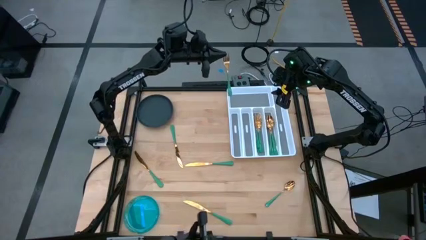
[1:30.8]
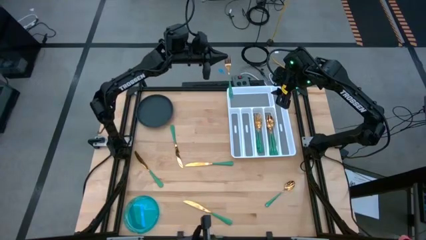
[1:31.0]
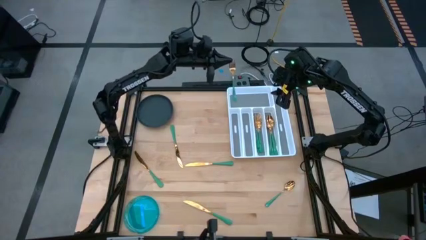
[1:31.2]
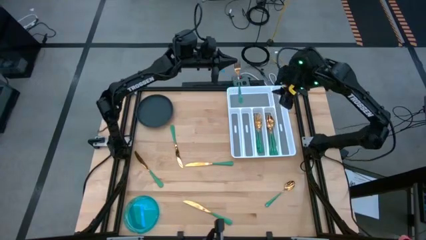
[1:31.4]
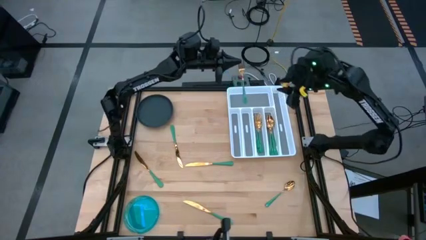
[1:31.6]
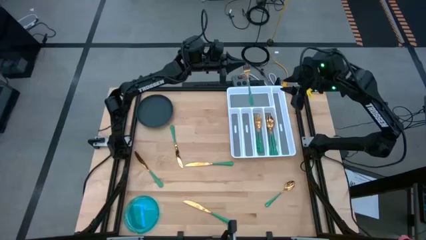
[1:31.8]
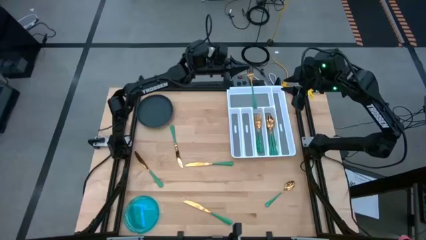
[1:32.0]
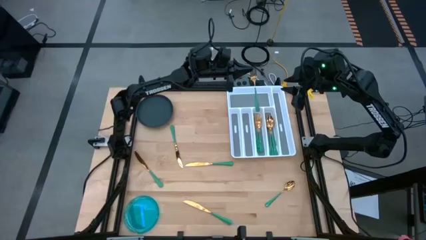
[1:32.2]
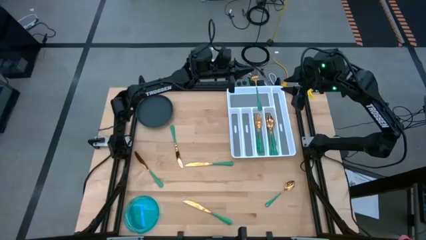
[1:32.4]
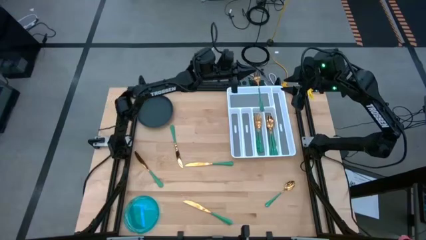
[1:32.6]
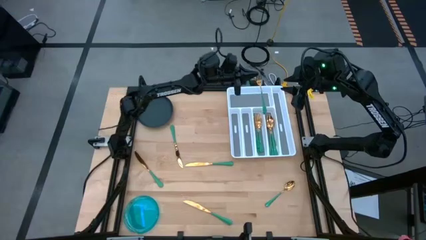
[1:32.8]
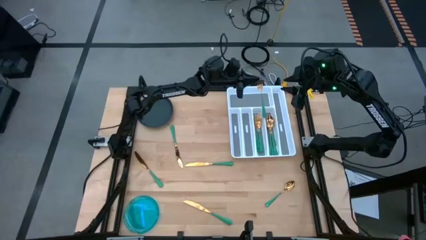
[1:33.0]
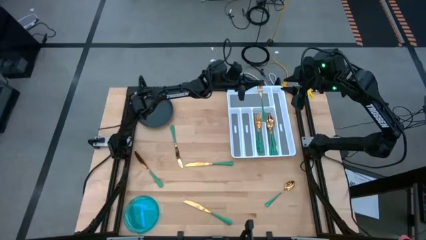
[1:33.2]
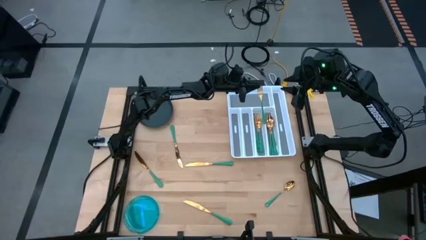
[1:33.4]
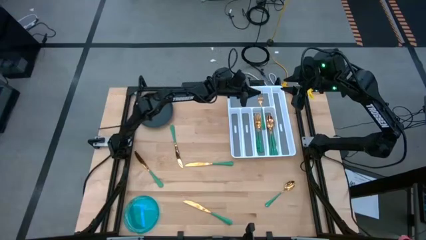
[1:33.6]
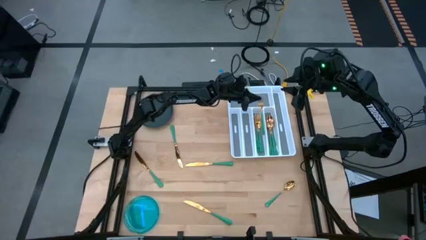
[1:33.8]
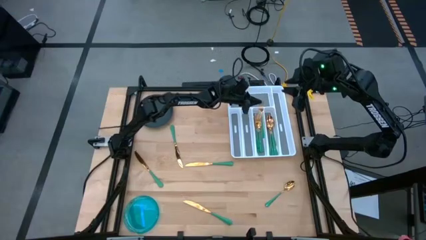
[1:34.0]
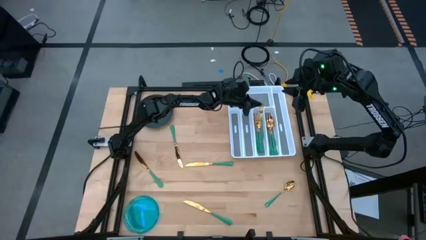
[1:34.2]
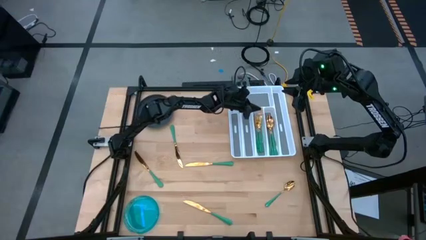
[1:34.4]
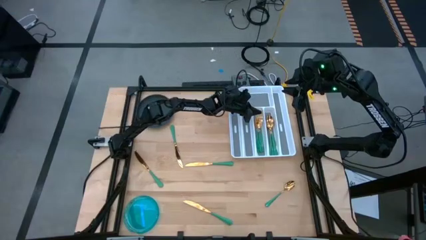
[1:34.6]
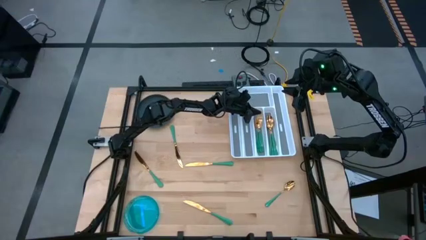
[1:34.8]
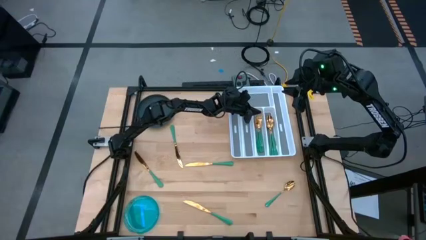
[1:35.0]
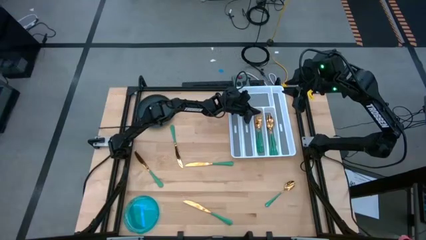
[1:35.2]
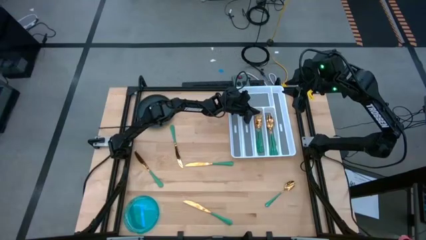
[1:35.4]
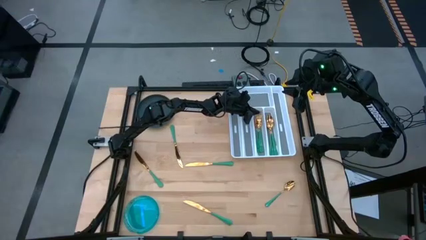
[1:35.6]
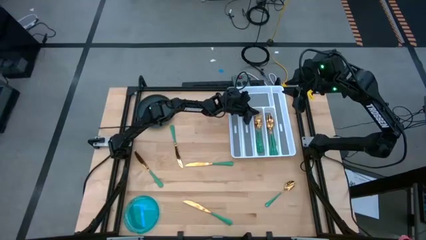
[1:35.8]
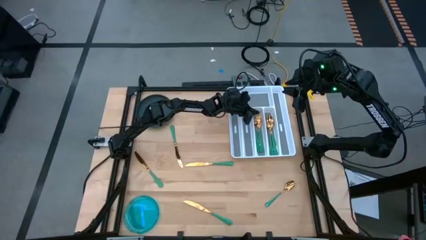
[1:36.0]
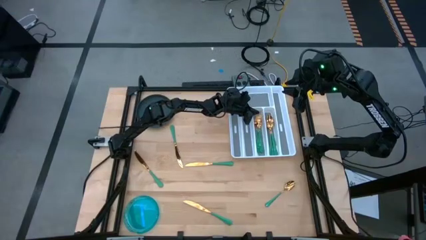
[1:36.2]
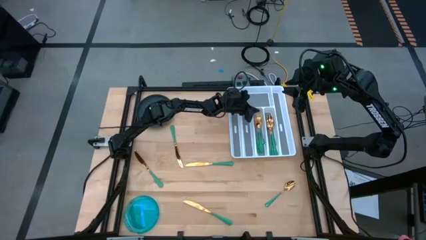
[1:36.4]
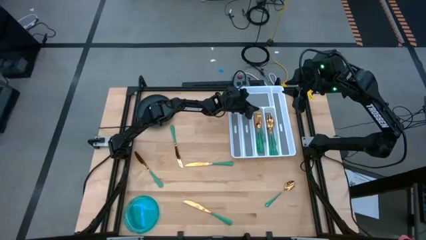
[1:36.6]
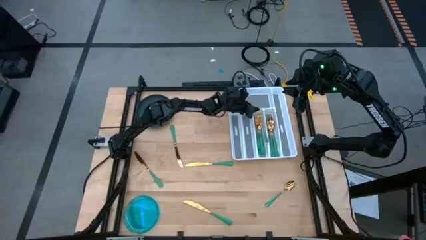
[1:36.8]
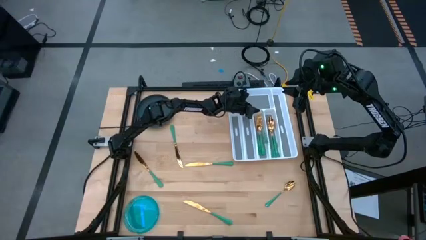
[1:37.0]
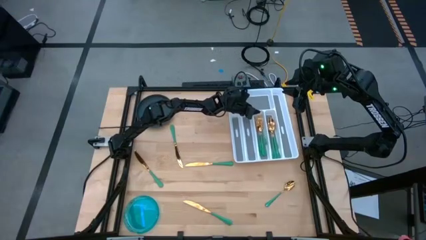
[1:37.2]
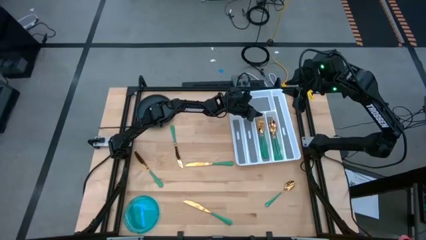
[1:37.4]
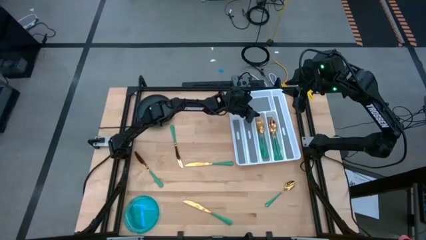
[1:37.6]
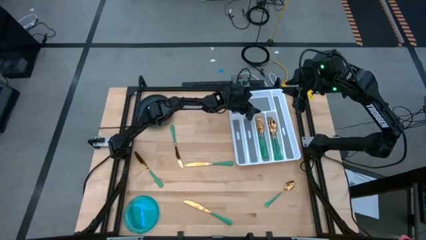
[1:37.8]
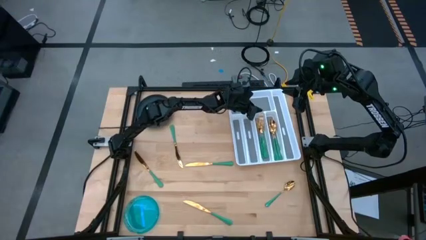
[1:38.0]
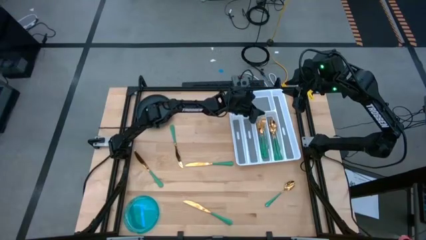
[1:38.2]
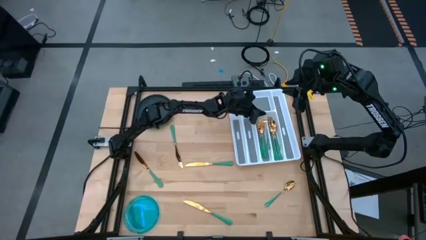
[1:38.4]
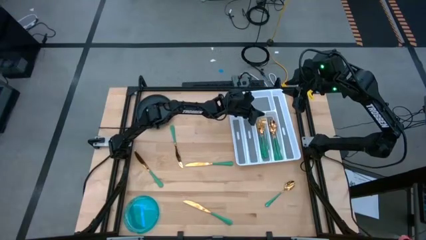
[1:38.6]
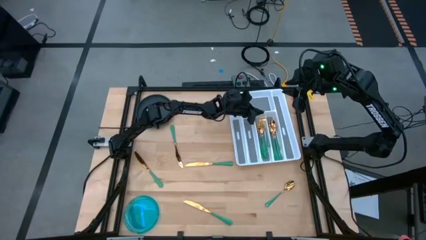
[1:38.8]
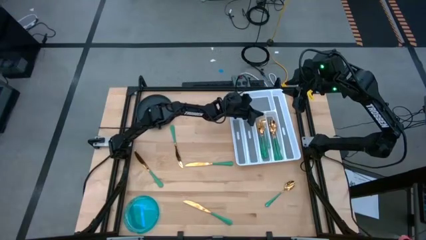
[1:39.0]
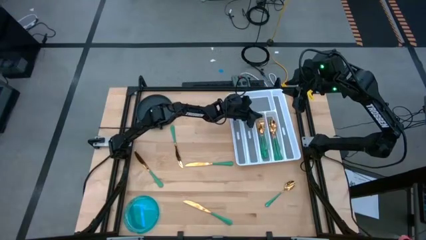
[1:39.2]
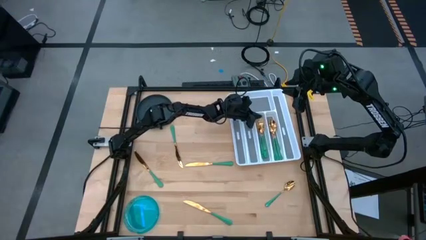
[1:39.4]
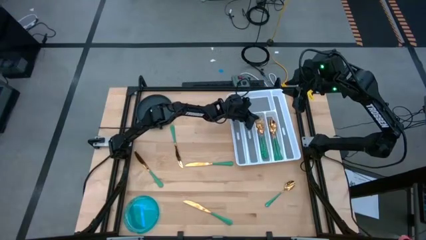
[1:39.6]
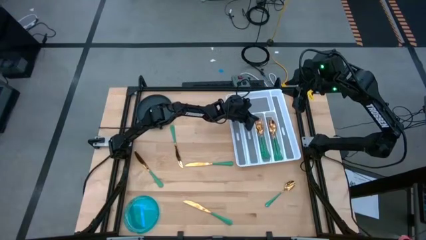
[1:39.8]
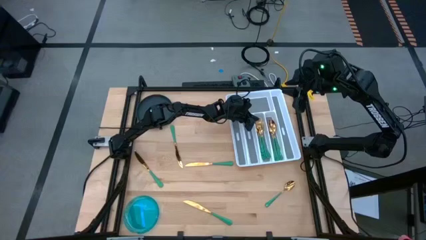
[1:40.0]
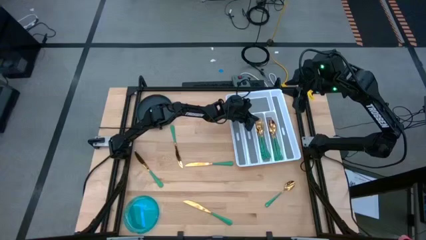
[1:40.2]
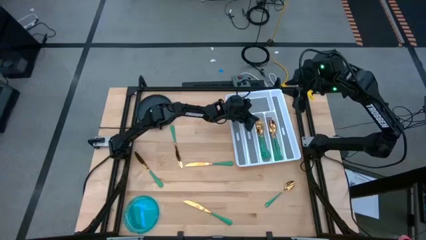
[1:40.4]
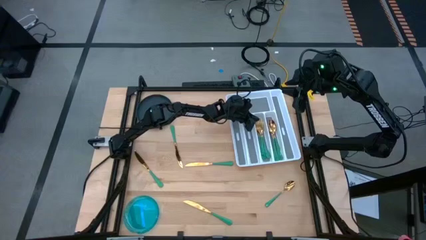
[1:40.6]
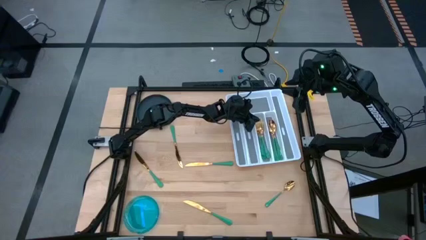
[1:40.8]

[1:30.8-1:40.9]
Task: Sort silverware
Put the green fork into the white silverware organizer

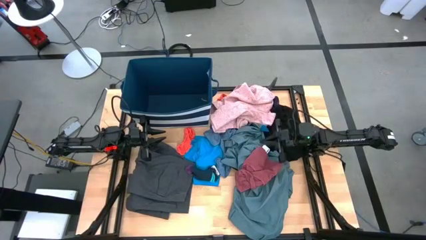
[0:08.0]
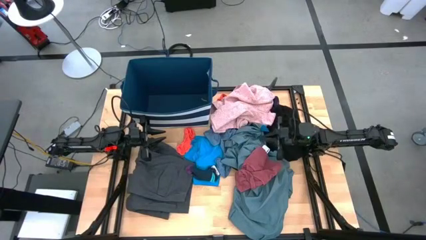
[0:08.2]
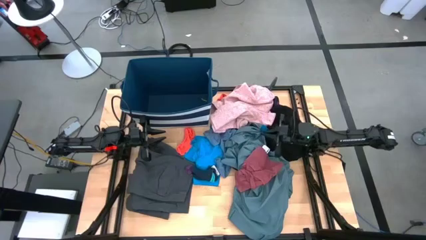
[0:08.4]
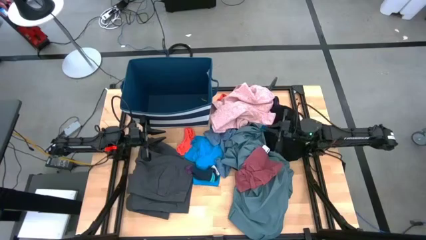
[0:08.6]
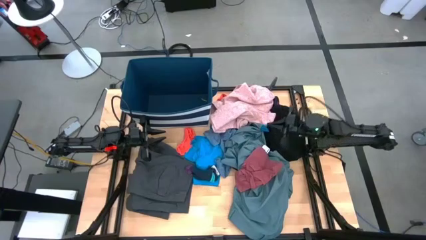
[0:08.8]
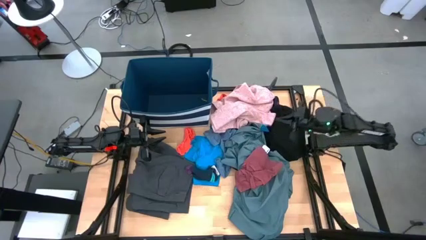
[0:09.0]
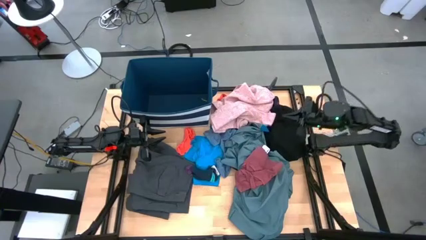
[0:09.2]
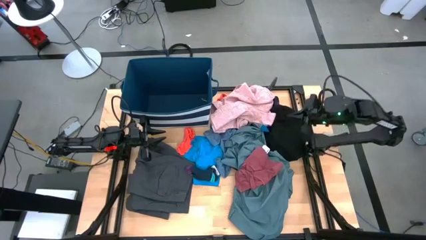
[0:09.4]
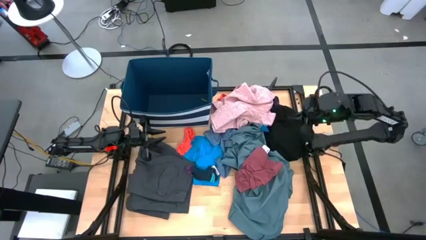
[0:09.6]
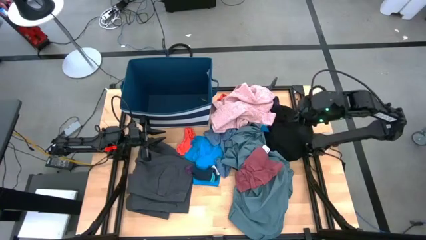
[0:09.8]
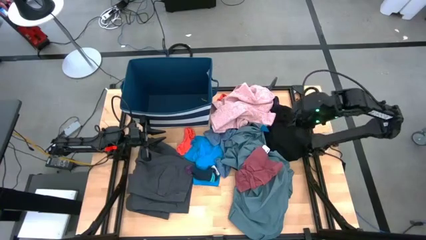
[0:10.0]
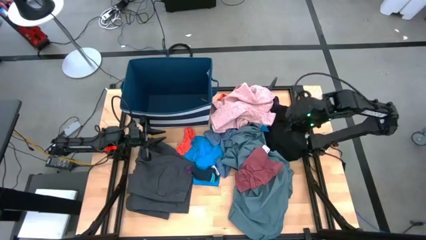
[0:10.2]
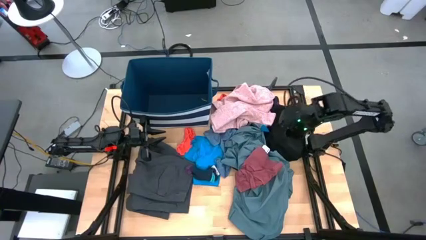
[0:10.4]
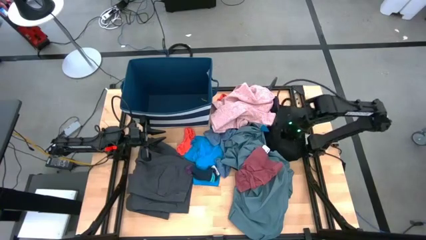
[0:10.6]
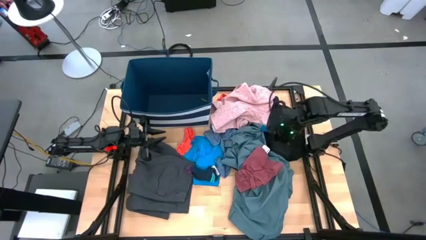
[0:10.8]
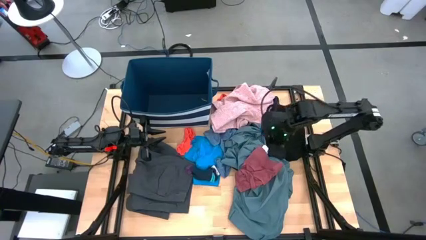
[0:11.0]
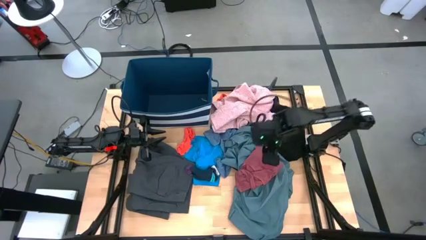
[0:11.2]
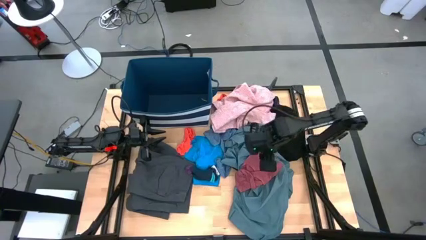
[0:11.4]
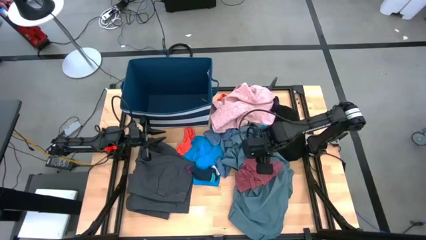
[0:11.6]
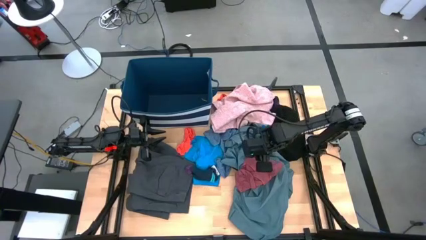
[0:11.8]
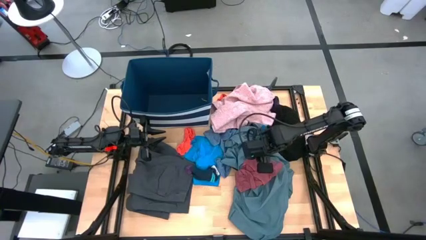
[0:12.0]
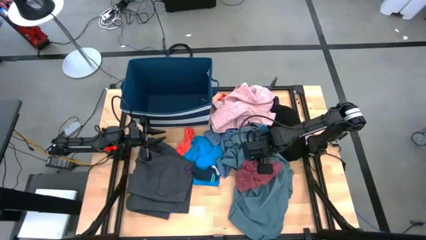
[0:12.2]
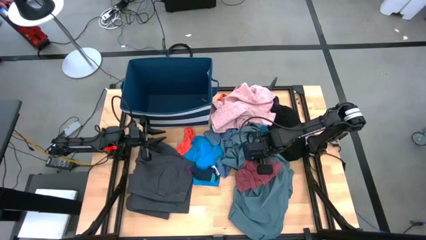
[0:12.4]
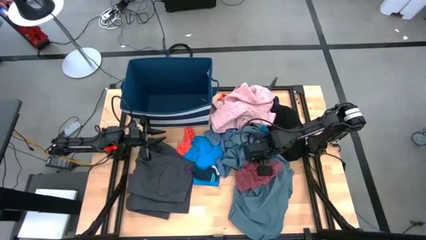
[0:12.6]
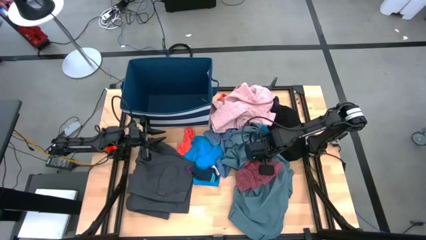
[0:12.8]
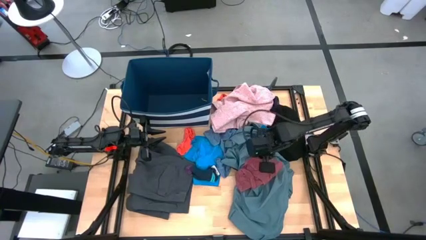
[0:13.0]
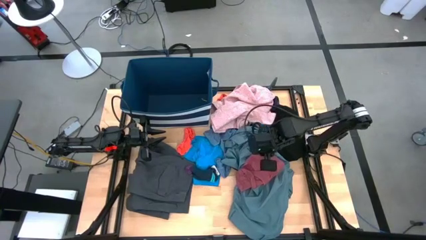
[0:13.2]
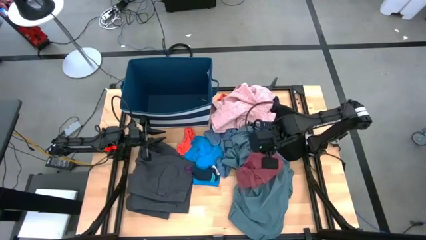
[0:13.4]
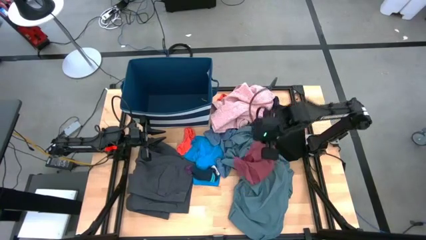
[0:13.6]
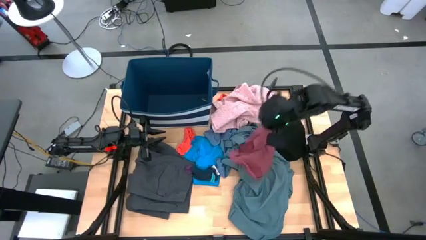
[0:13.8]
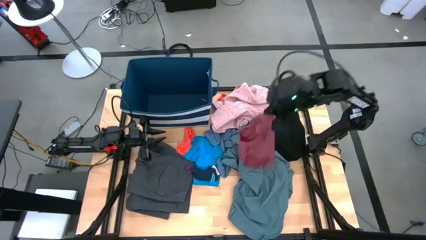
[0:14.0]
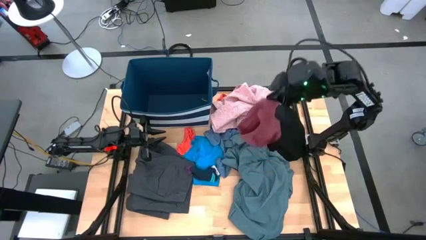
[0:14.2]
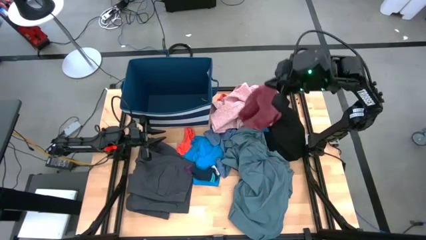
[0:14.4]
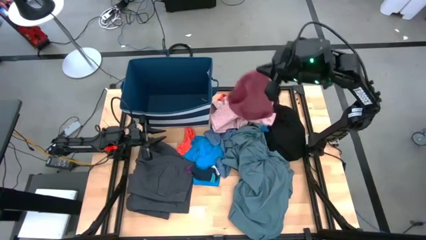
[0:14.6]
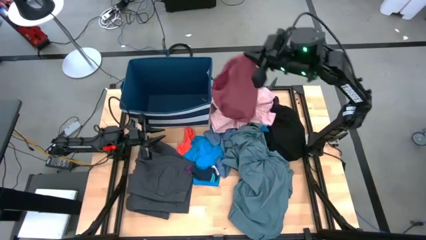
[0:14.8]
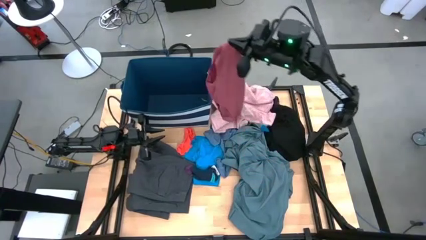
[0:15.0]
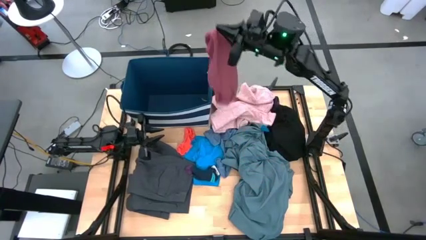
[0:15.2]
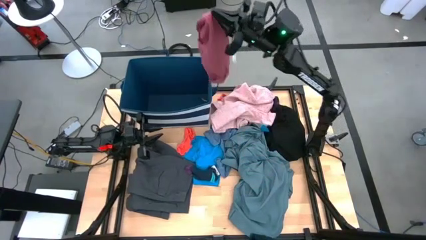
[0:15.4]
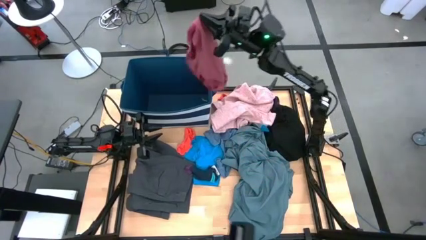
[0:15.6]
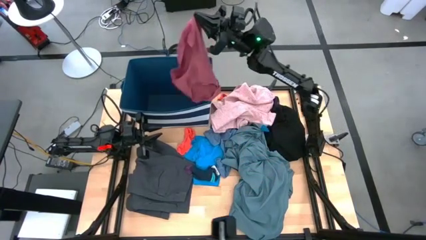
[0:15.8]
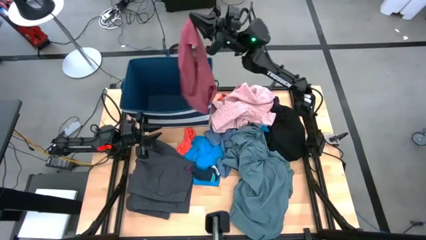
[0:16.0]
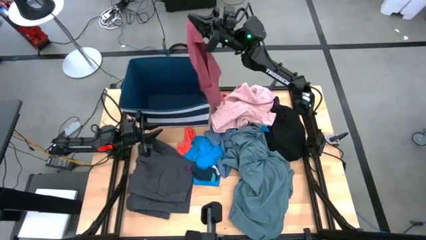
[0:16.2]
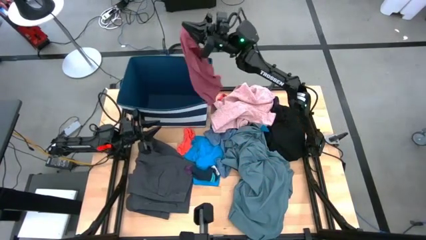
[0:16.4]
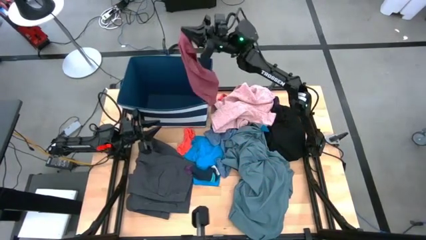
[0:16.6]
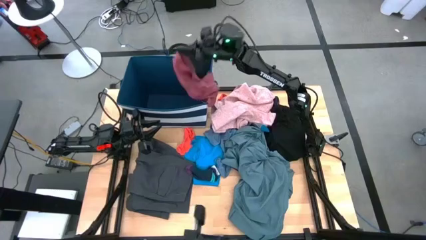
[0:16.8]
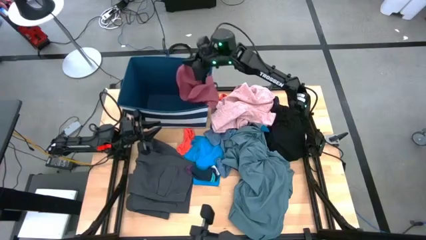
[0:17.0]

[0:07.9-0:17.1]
Task: Sort clothes
Put the red underwear into the blue laundry bin
